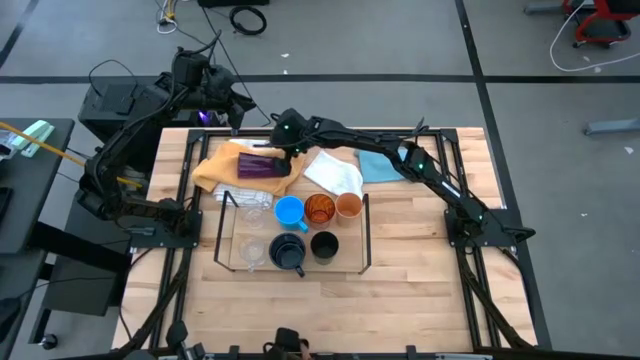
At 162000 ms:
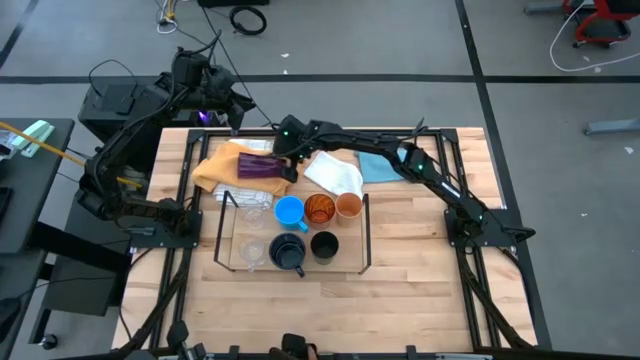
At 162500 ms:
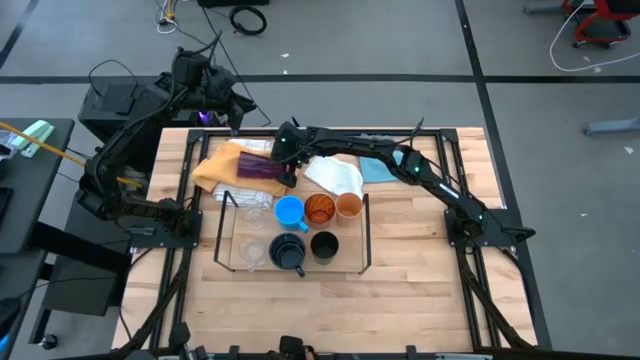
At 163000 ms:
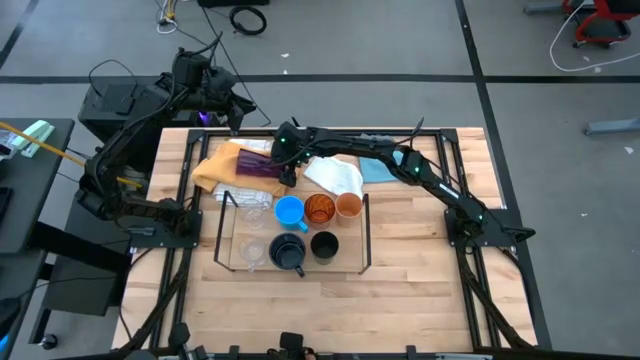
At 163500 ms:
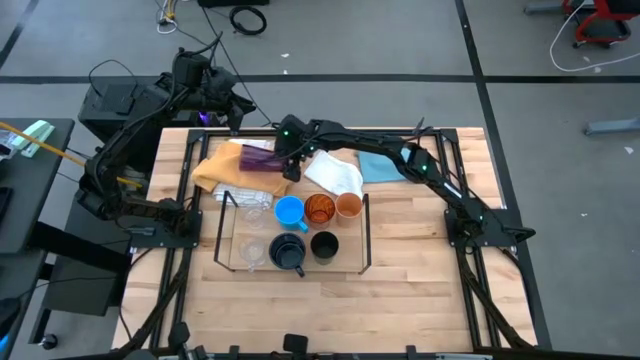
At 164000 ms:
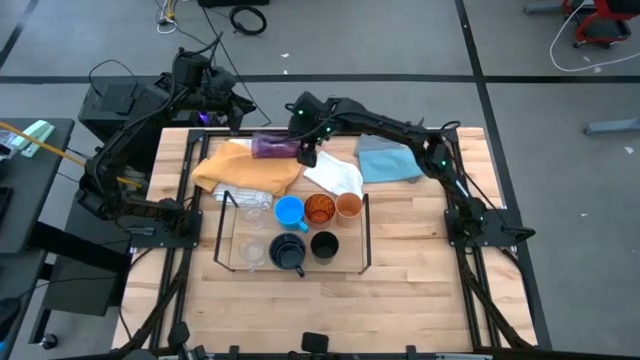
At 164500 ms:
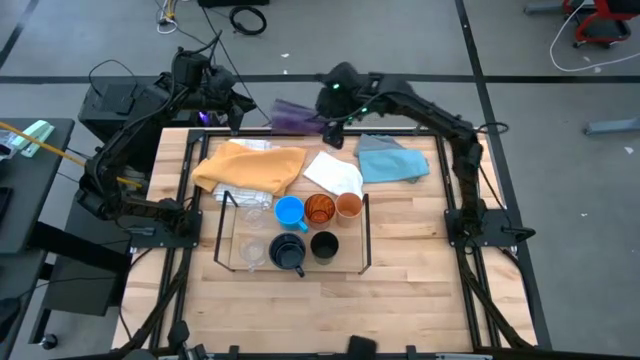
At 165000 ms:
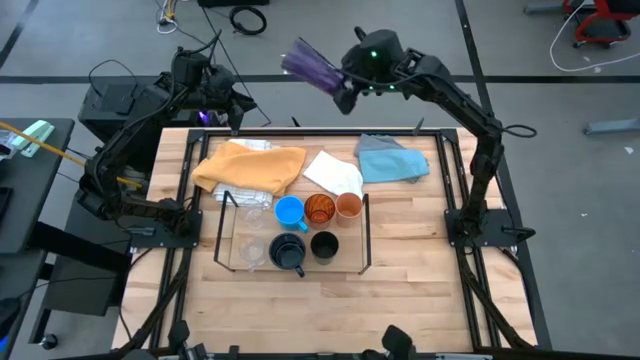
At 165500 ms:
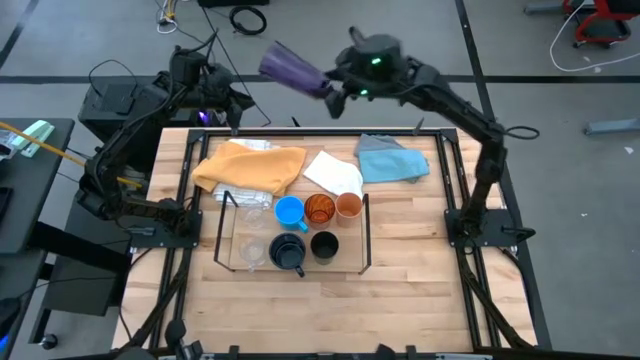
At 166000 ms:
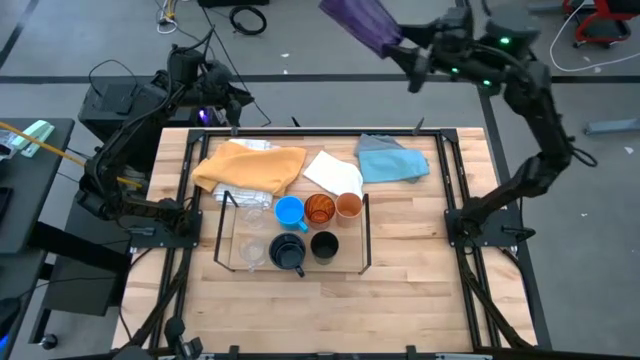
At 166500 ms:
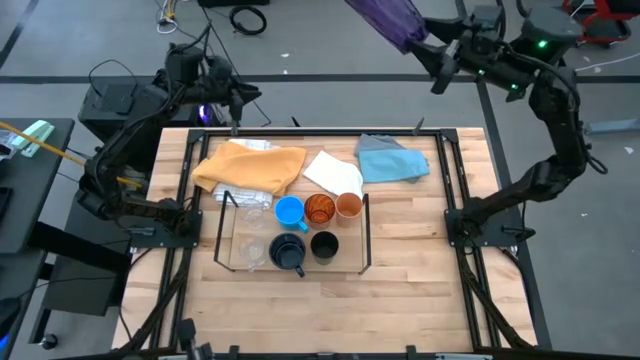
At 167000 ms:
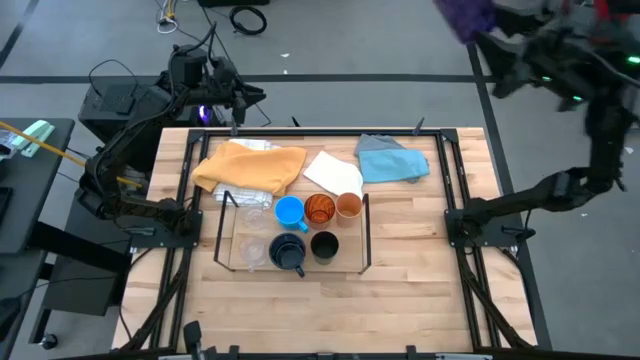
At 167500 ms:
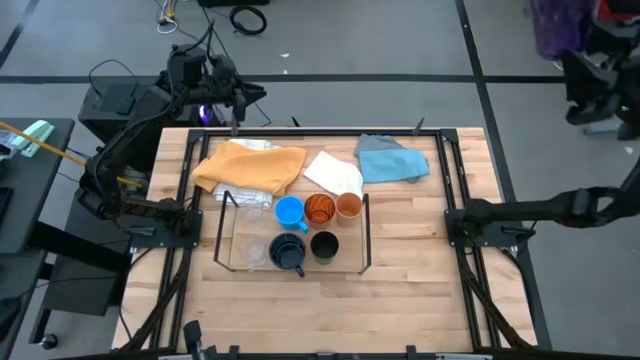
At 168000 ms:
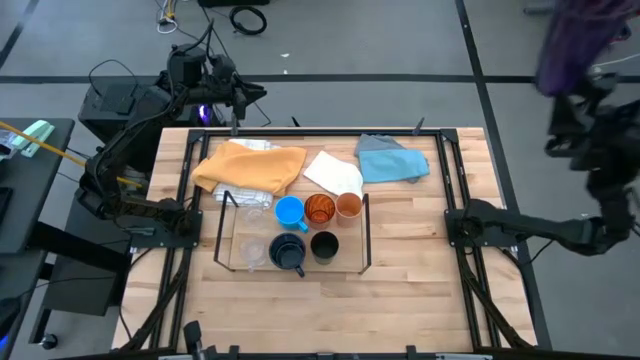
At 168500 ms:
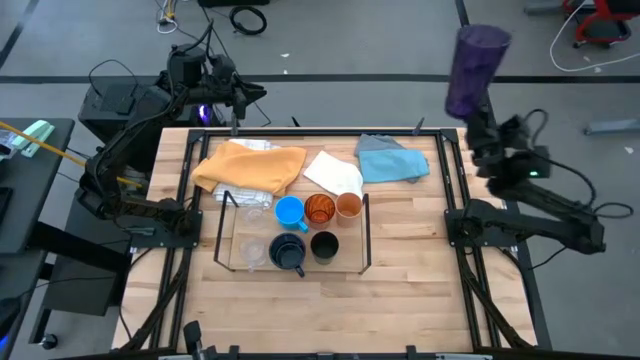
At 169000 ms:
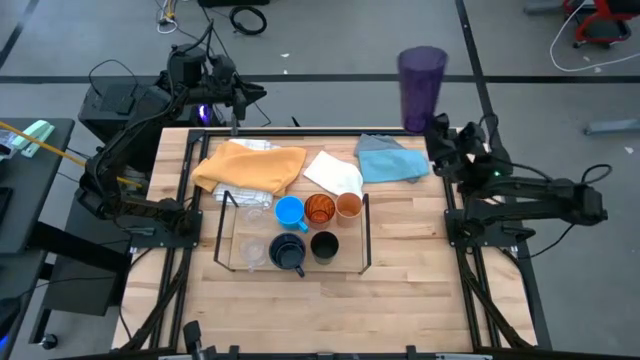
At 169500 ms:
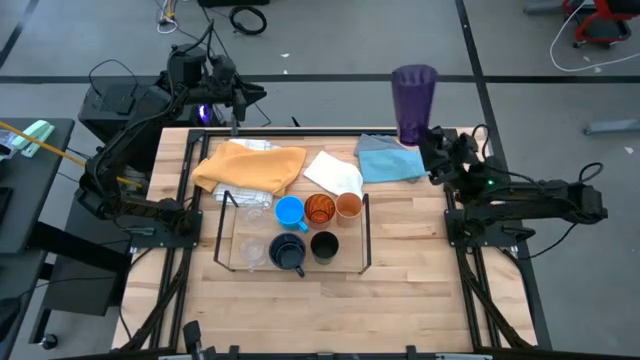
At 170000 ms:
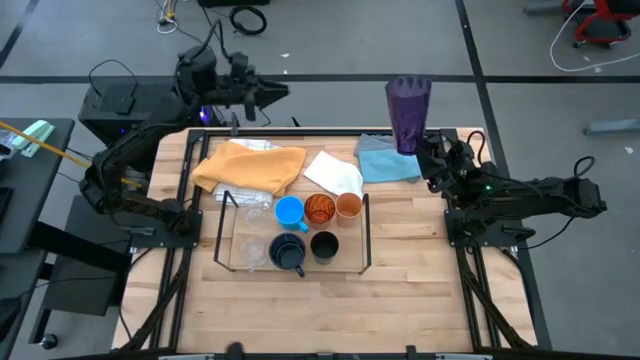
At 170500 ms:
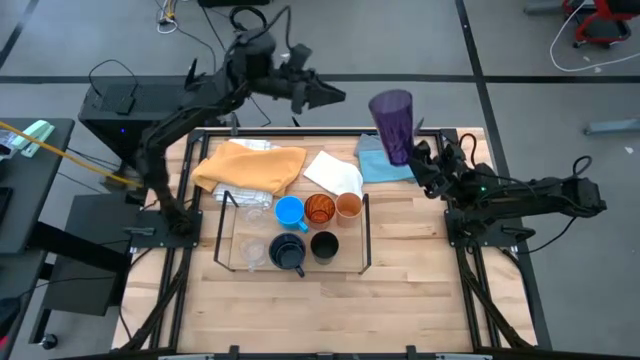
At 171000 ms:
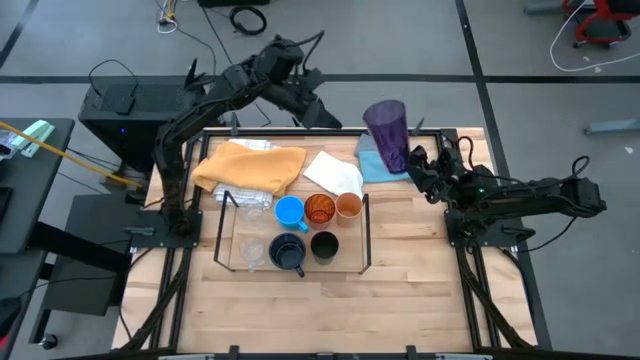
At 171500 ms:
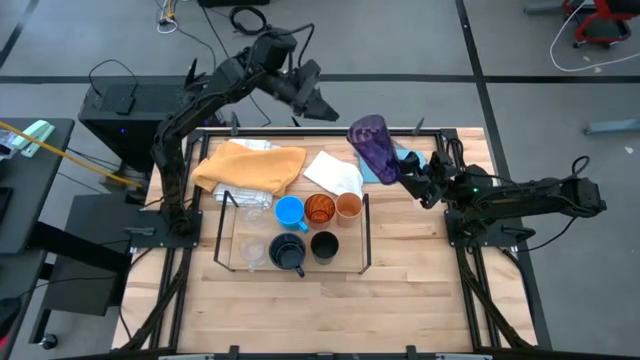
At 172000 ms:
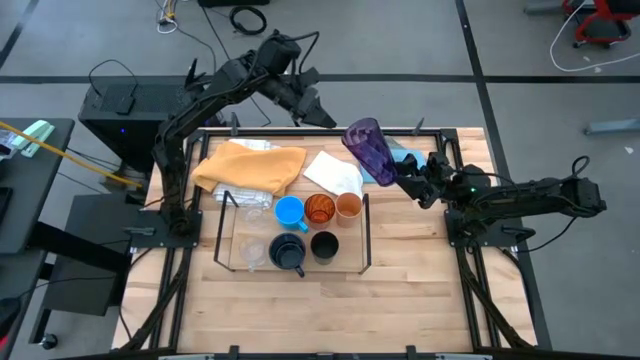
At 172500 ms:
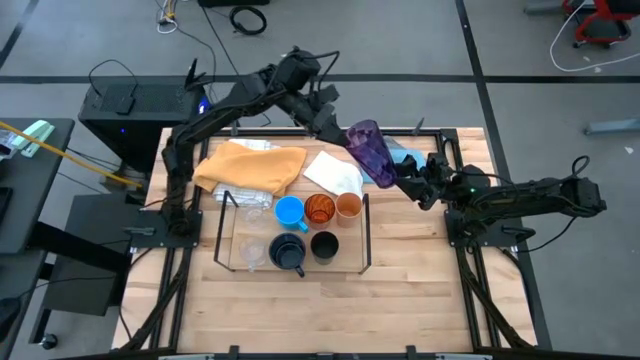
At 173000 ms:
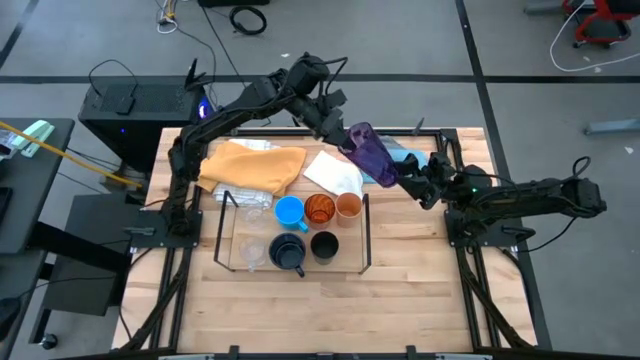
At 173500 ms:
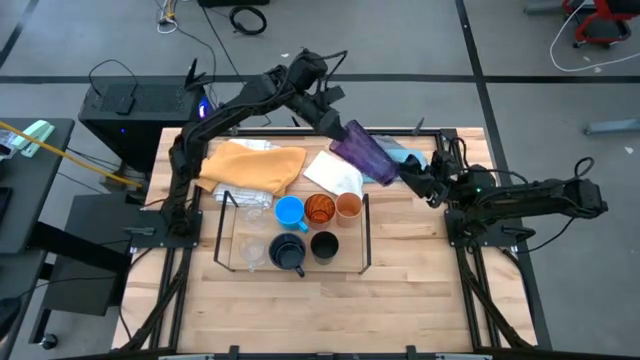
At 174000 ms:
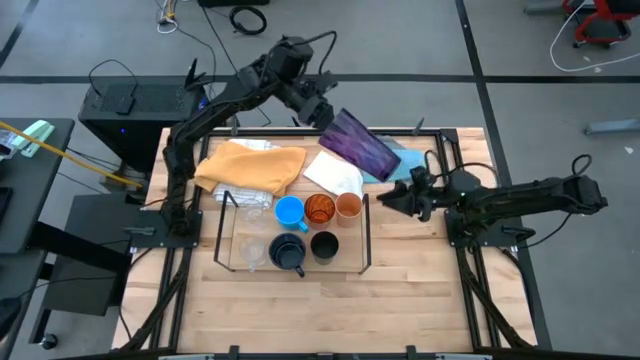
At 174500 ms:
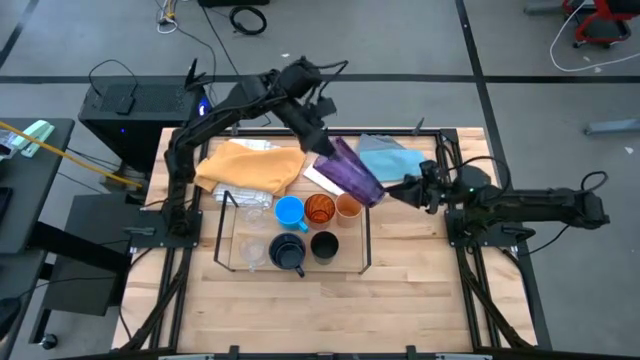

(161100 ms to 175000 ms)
Task: Stack small to large cups/mugs on shelf
Put the purple cup on the shelf

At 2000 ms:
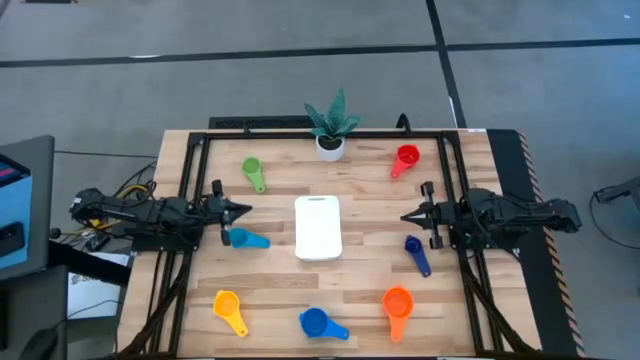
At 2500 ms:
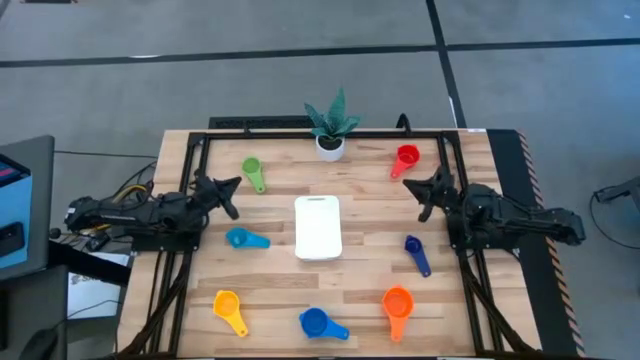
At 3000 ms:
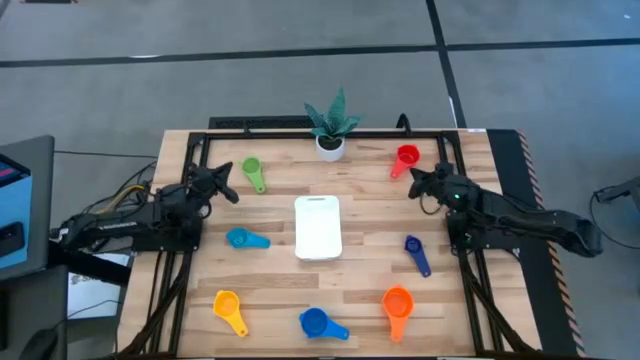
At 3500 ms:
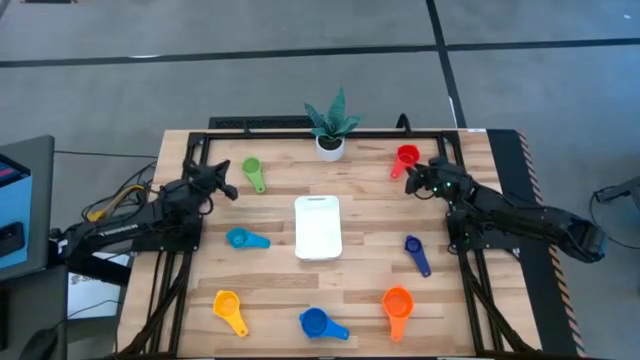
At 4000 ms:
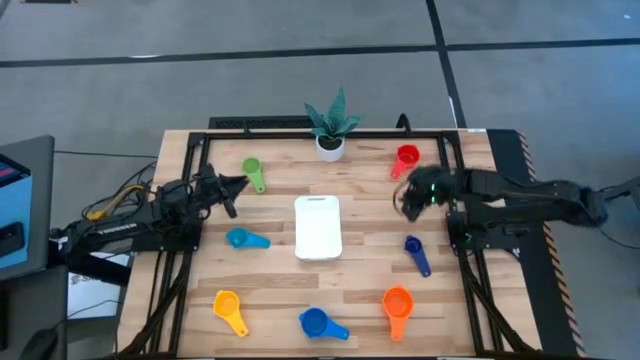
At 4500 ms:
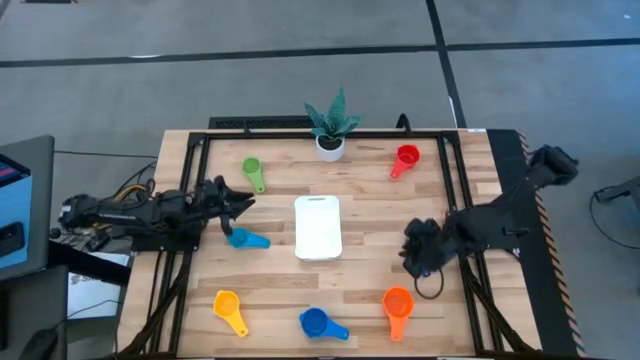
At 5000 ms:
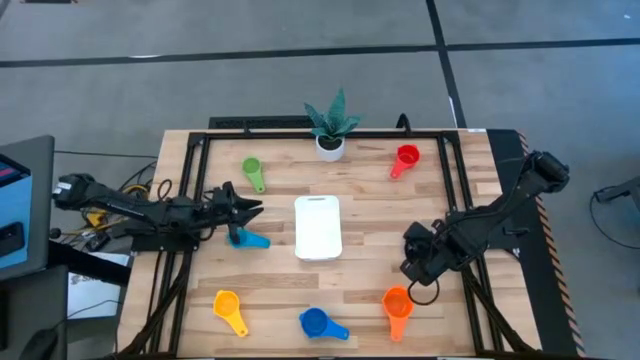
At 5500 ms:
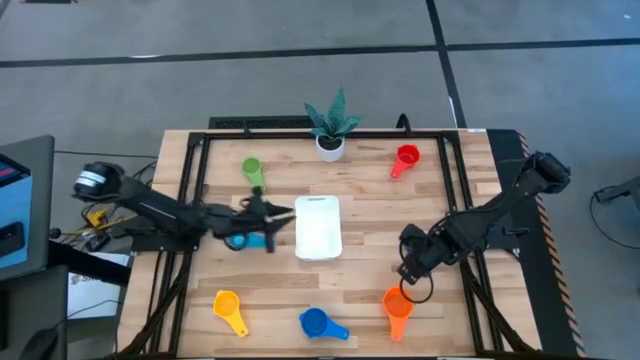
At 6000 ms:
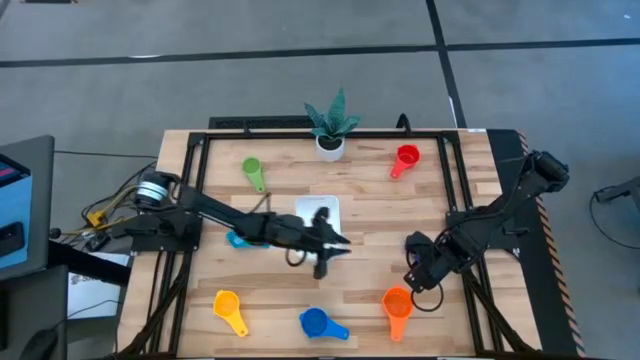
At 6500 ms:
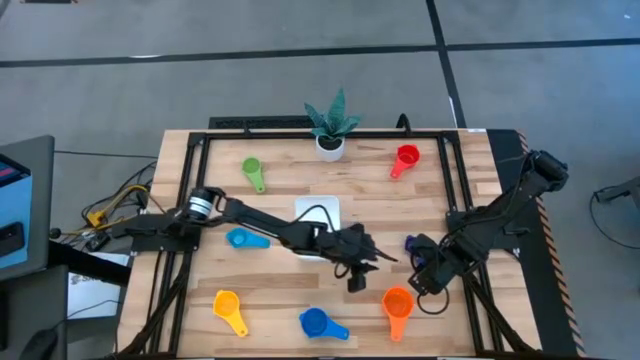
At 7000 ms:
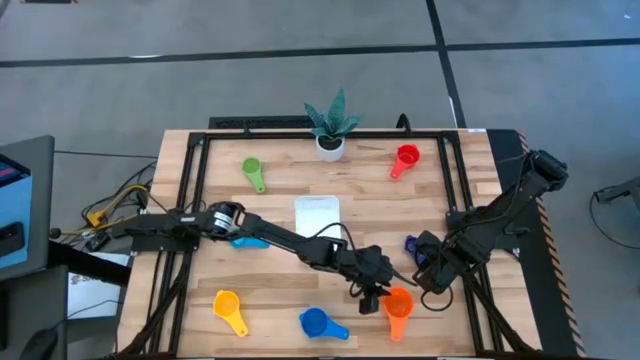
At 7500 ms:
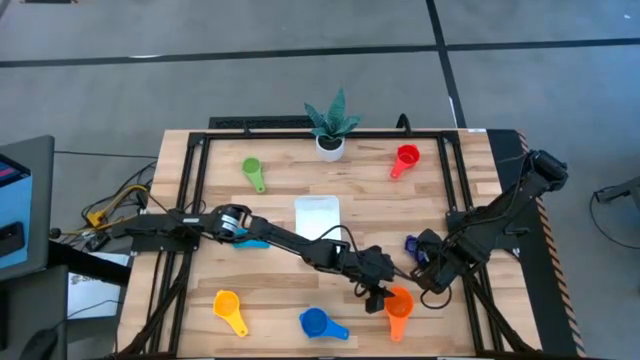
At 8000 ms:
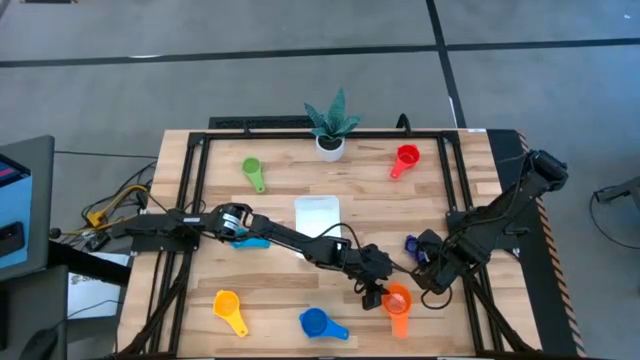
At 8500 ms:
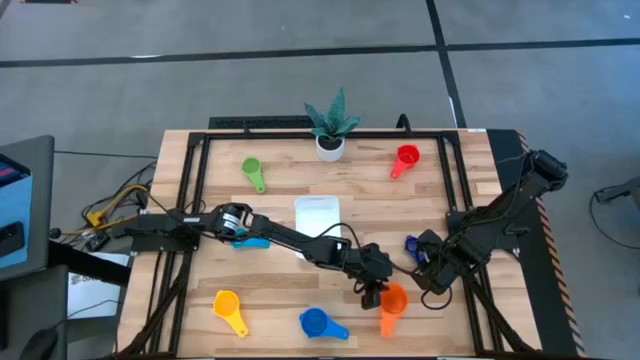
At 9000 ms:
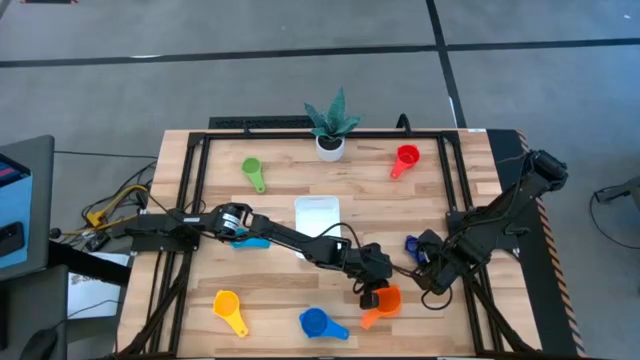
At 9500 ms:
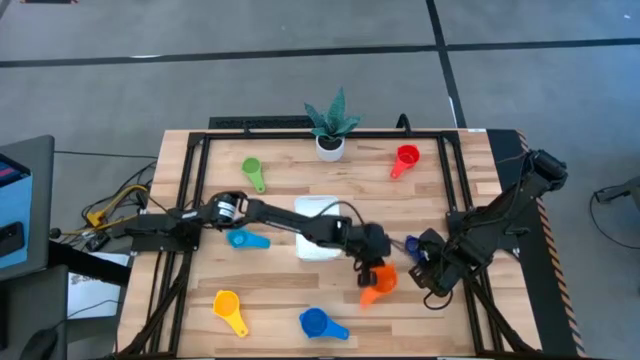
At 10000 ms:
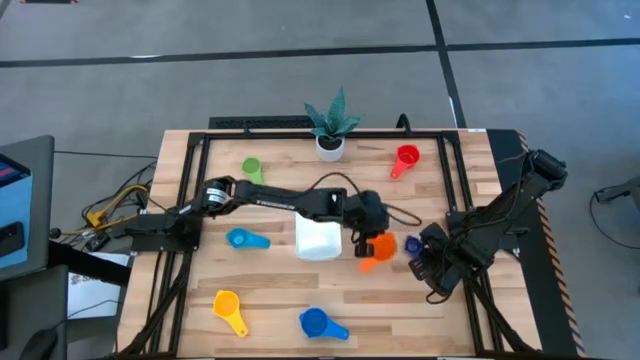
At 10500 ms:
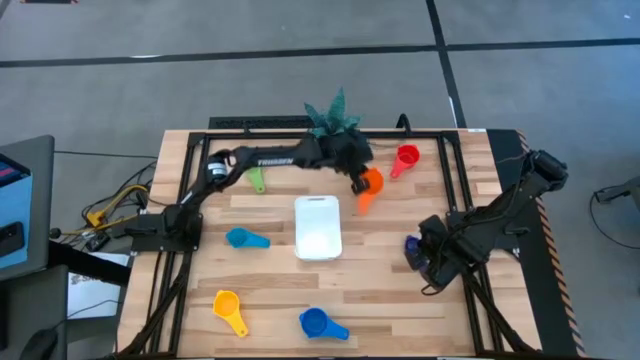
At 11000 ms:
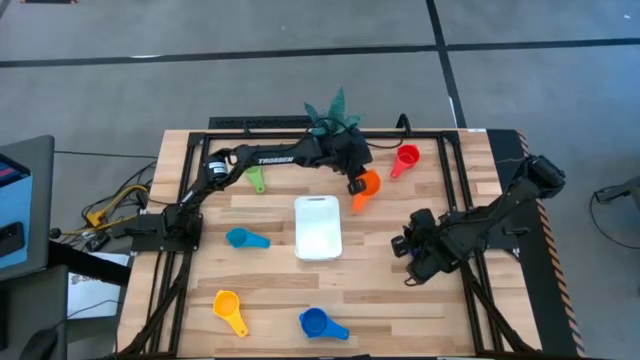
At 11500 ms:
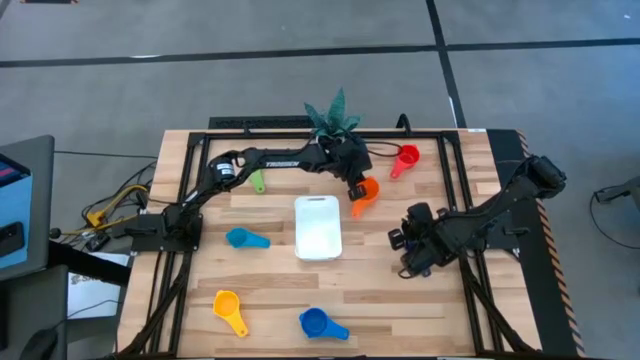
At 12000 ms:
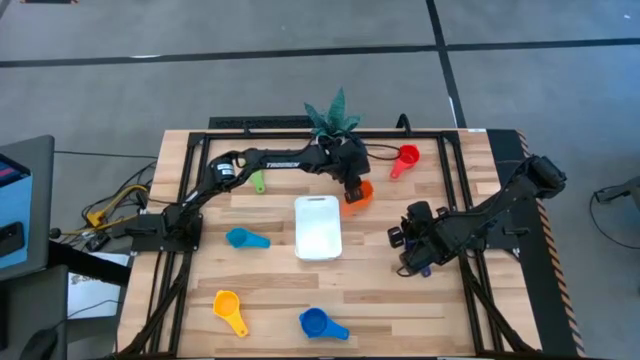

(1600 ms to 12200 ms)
Task: Nest measuring cups in basket
Move the orange measuring cup to the top right of the table
